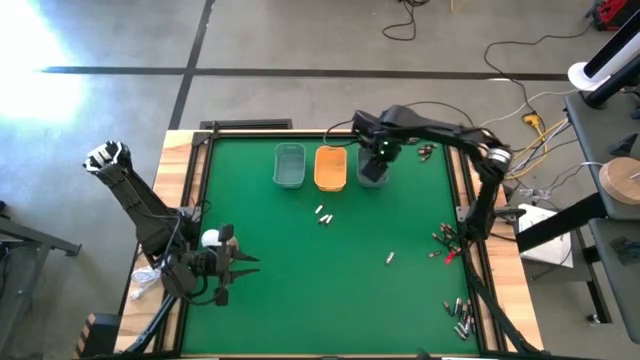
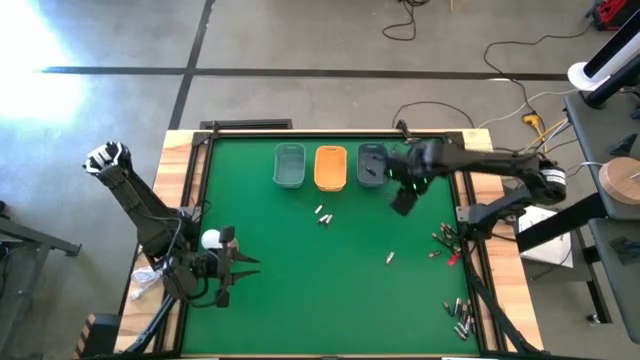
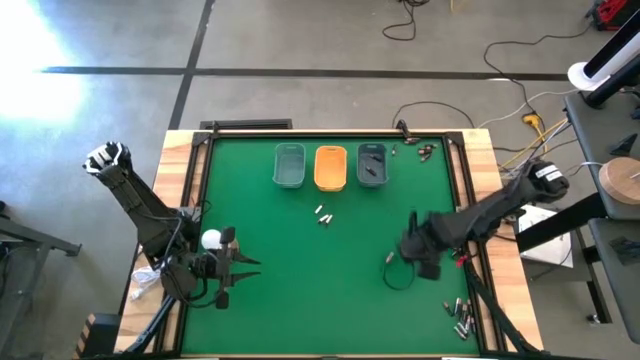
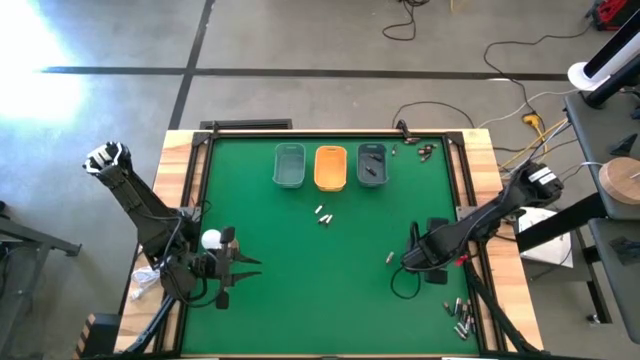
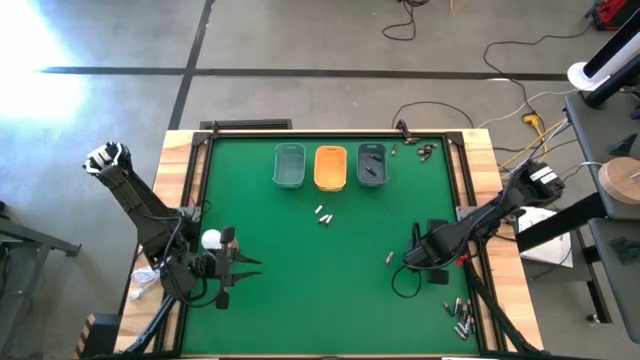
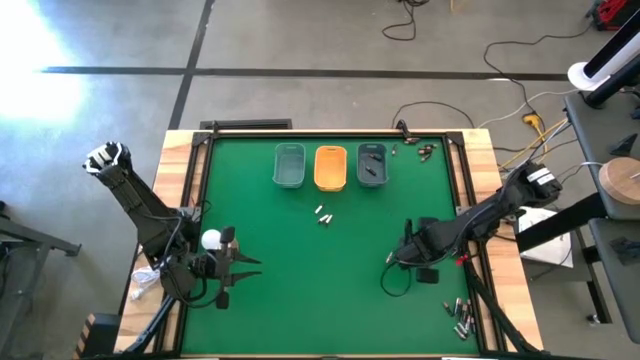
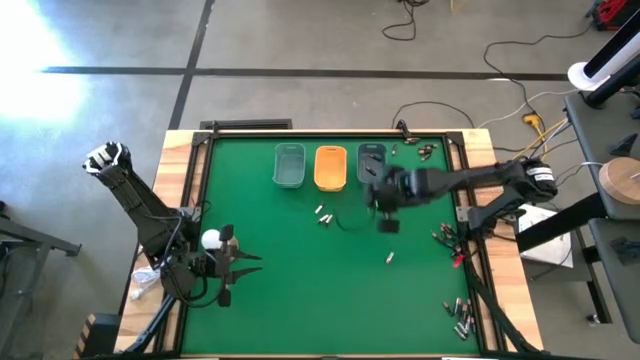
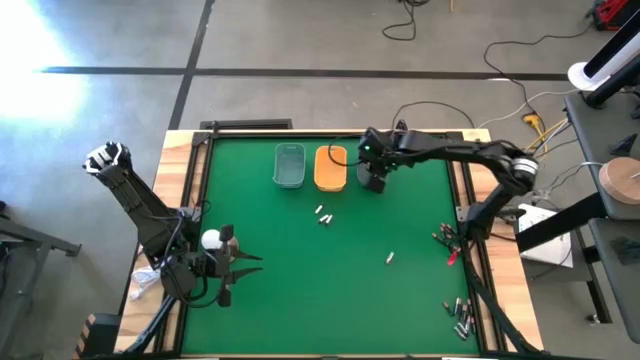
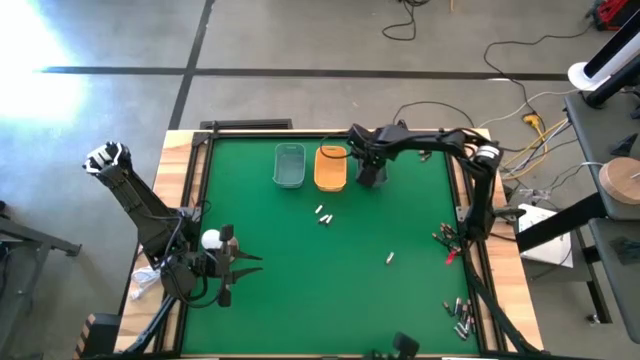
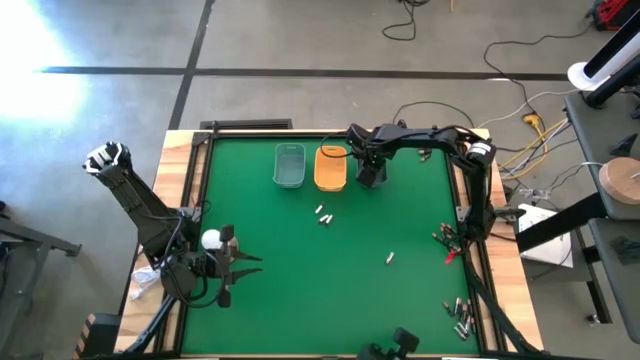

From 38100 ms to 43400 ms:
Task: Sort batteries
Put the small brown battery into the gray bin

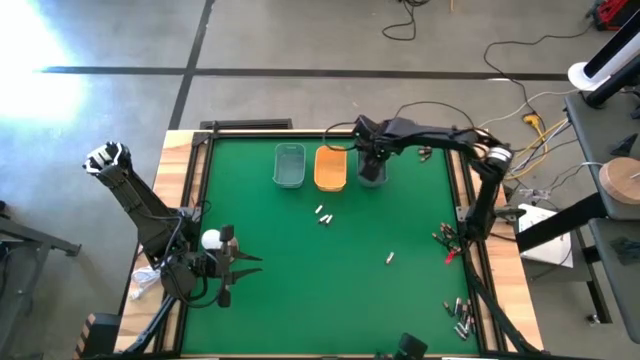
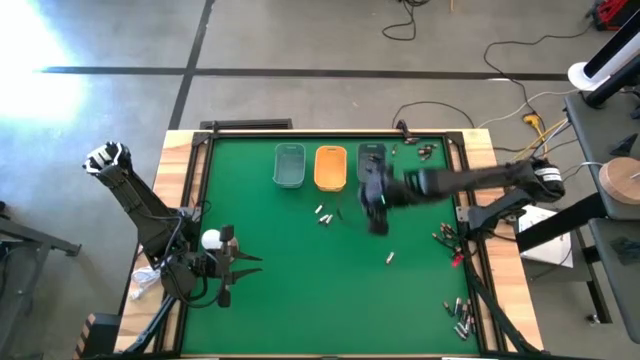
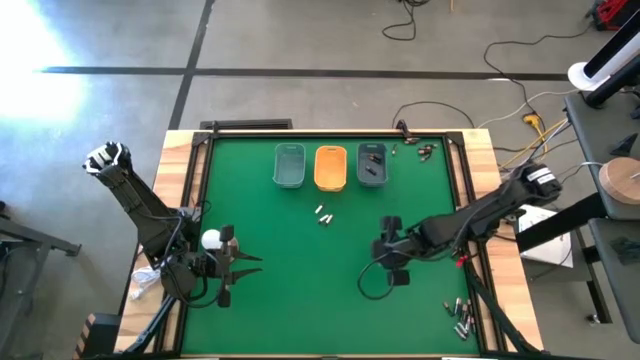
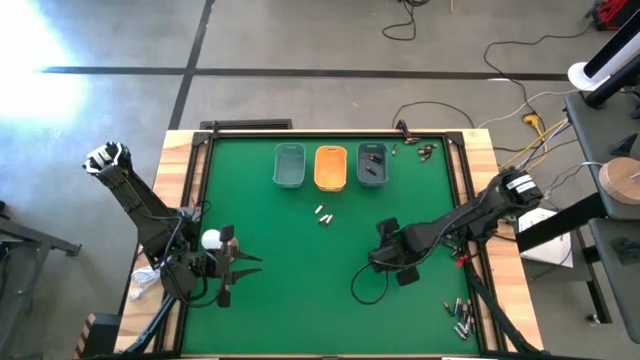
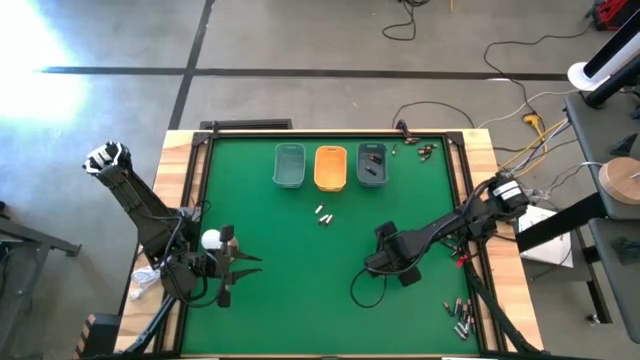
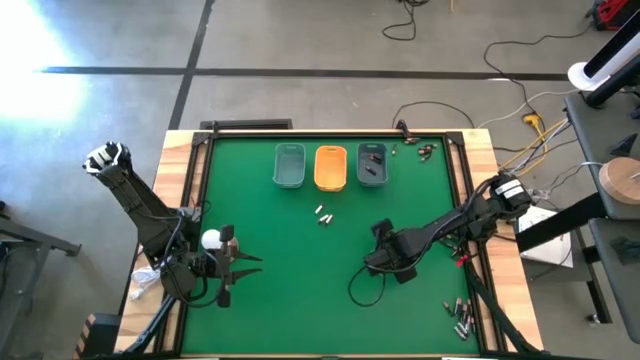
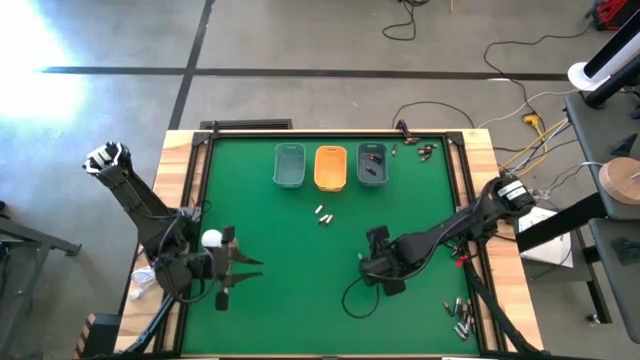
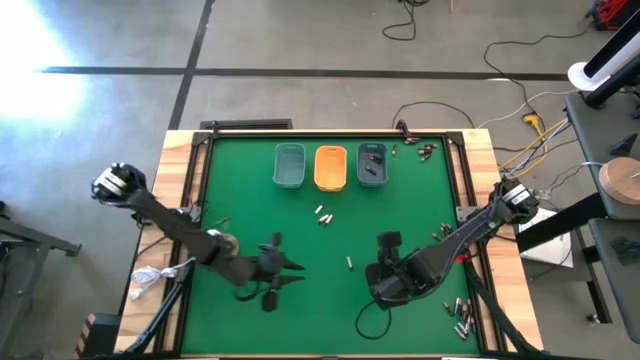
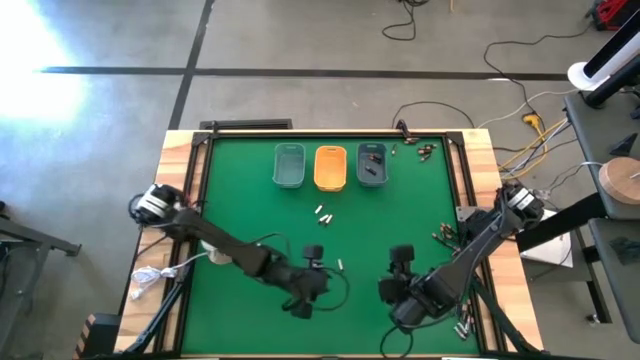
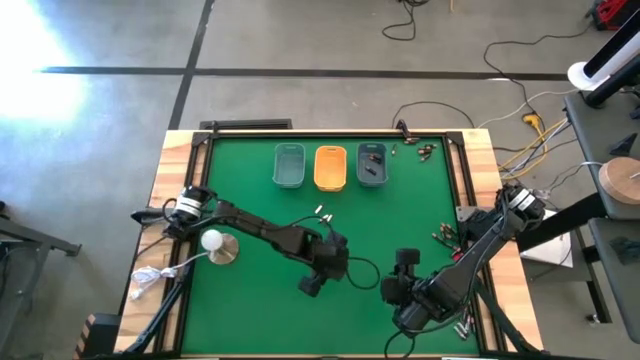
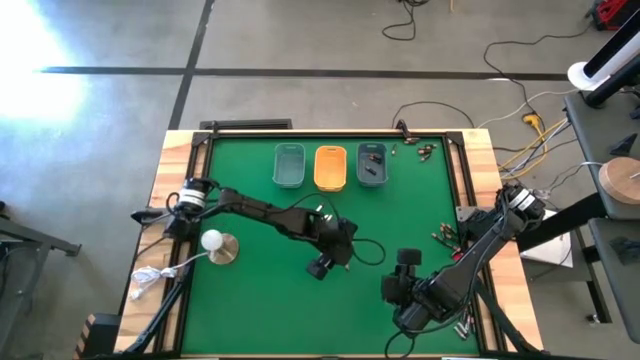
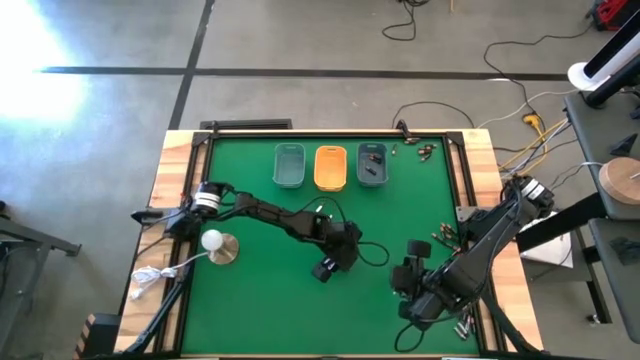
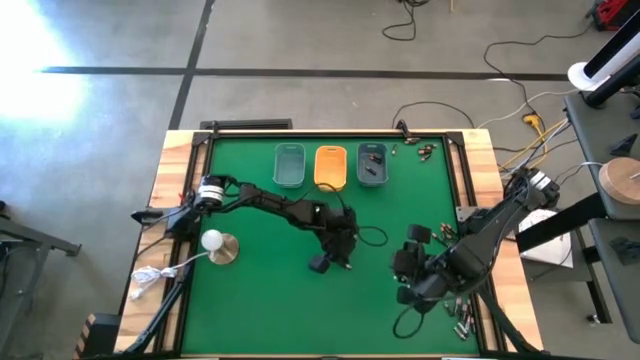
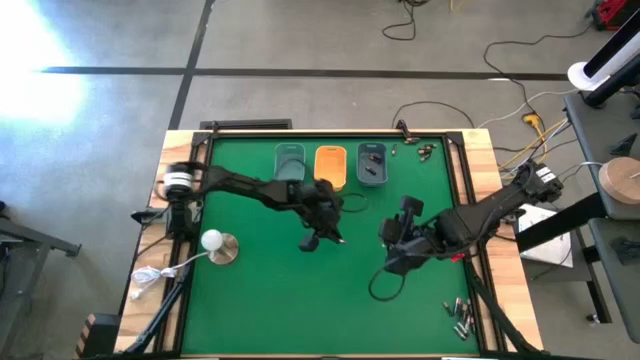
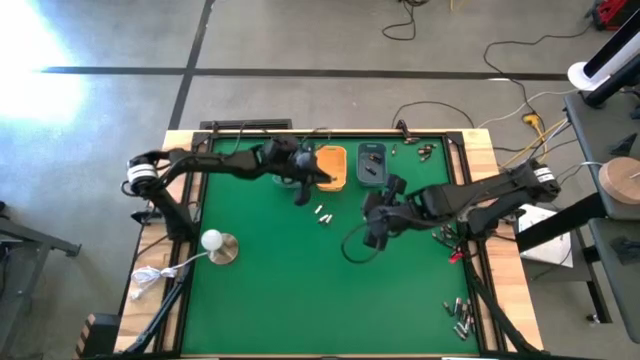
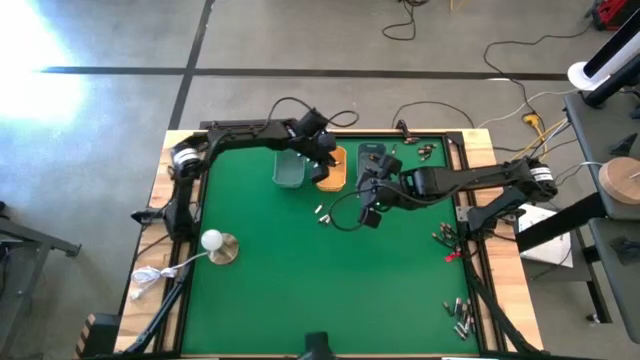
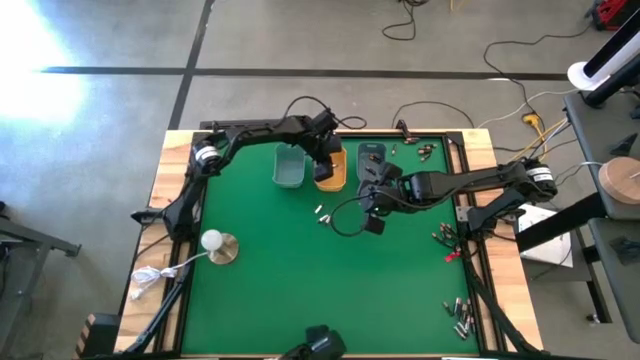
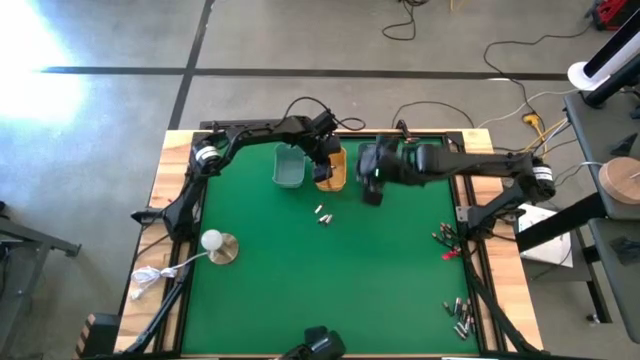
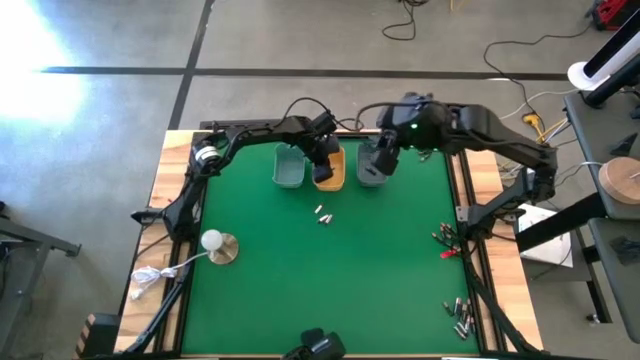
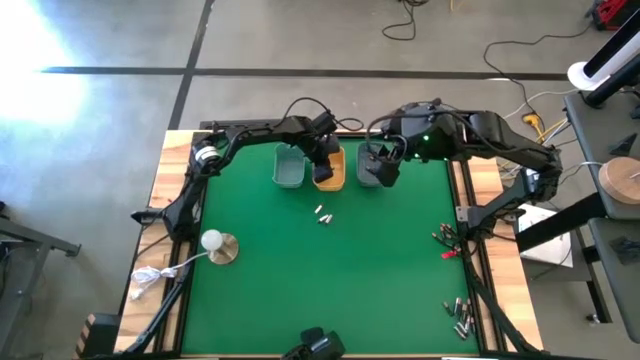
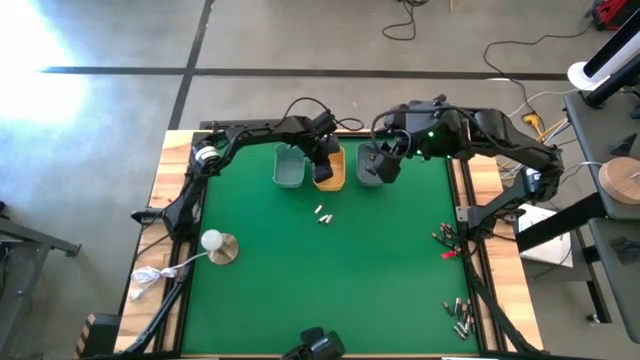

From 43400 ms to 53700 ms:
Put the silver battery into the yellow bin

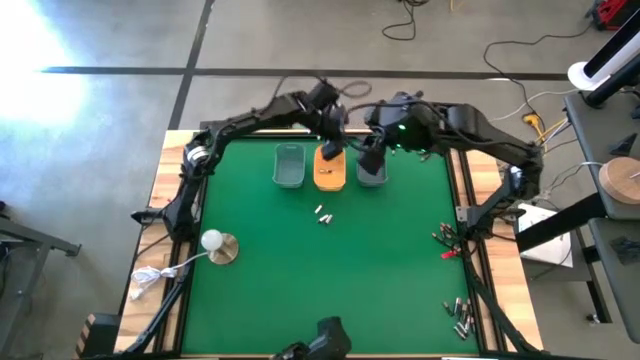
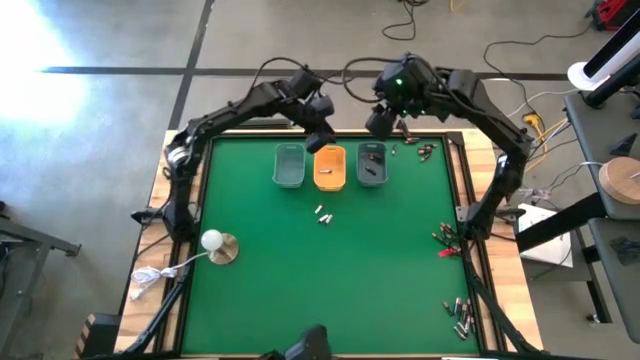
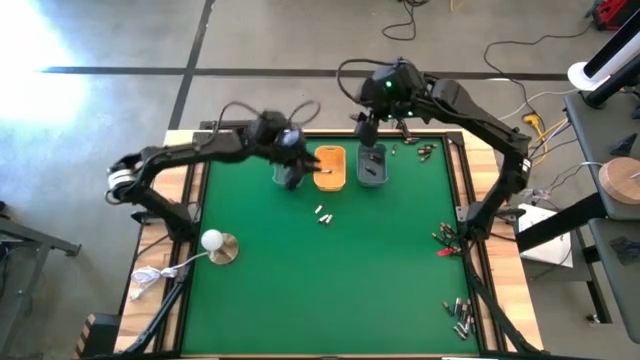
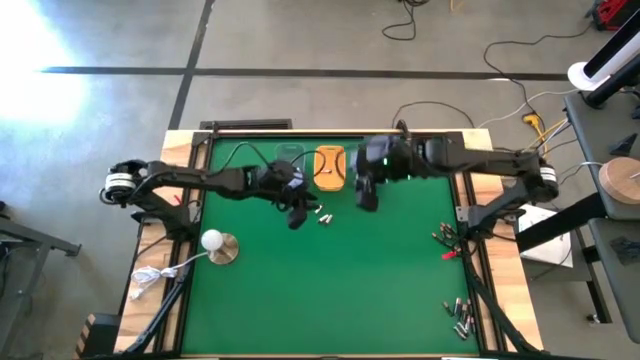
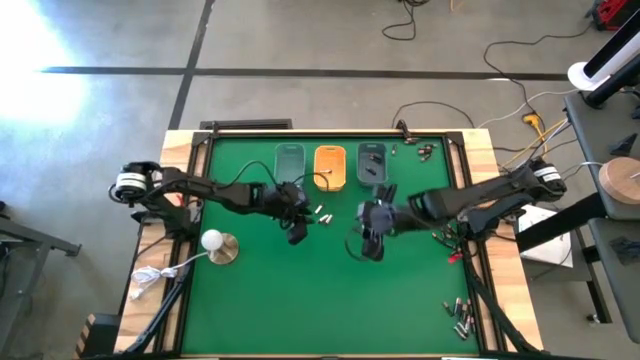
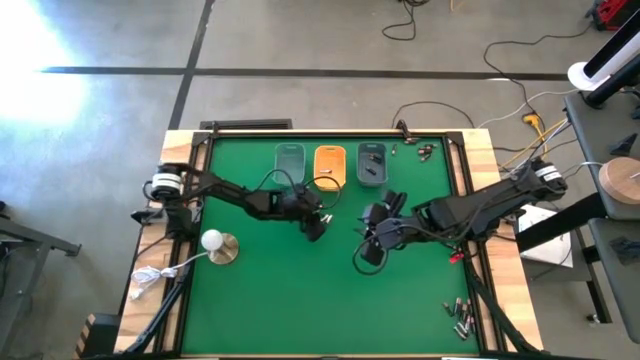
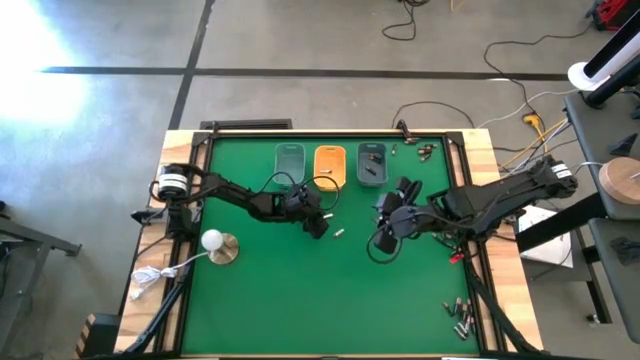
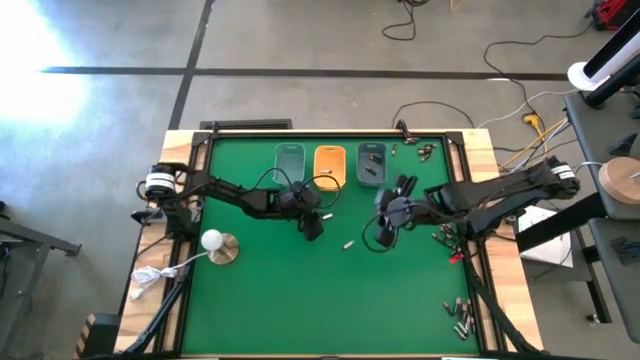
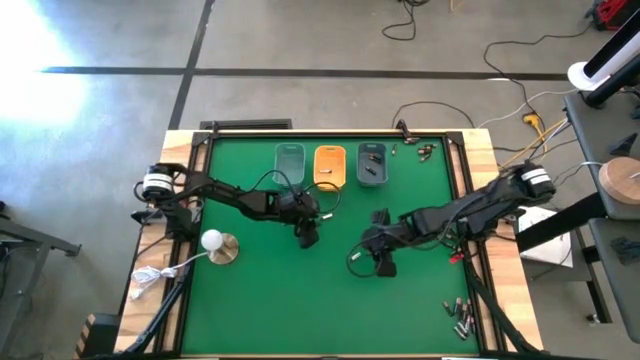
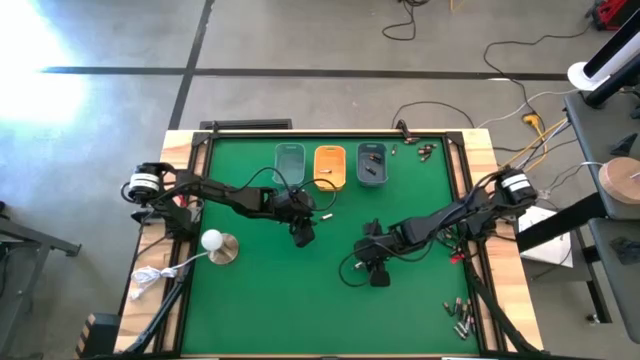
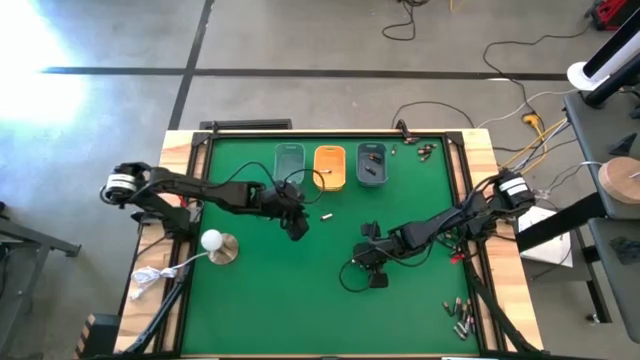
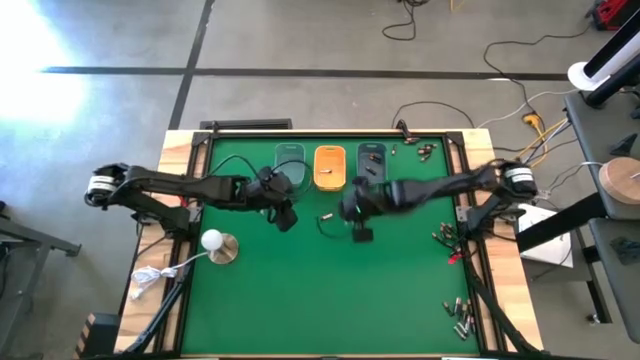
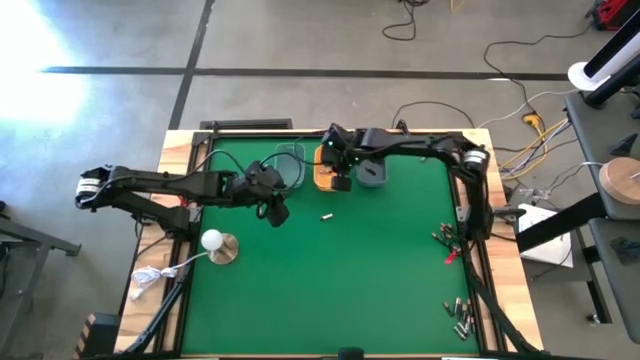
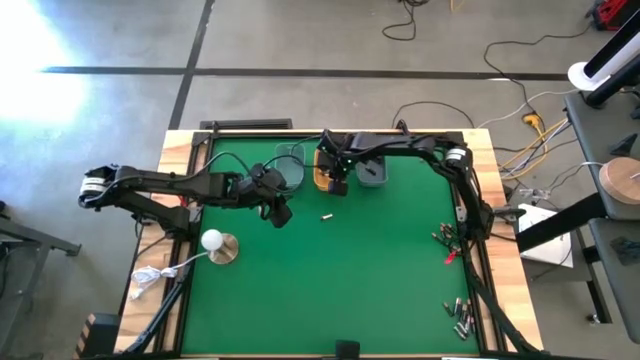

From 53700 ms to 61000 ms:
Put the silver battery into the yellow bin
